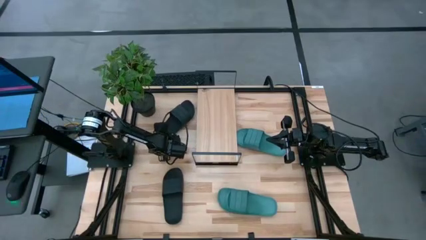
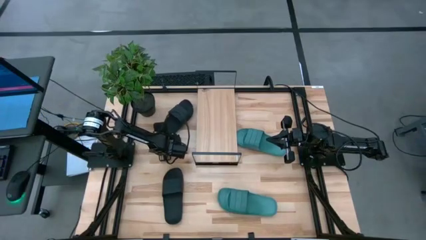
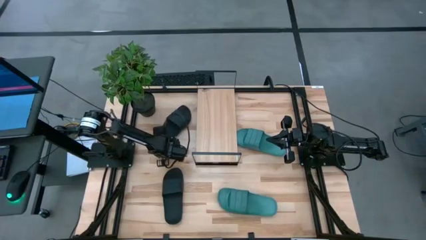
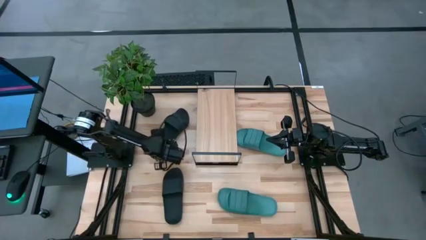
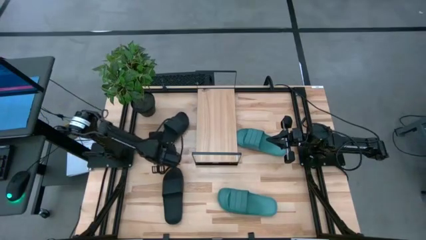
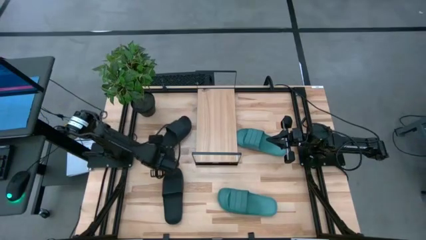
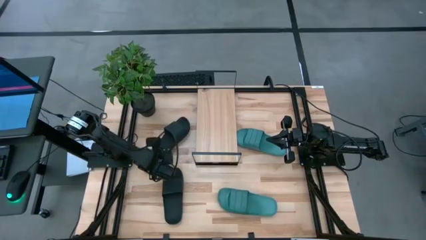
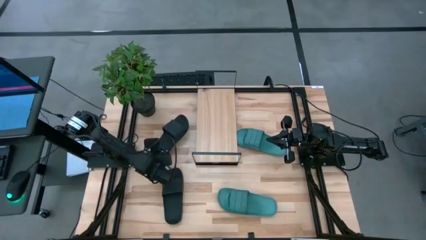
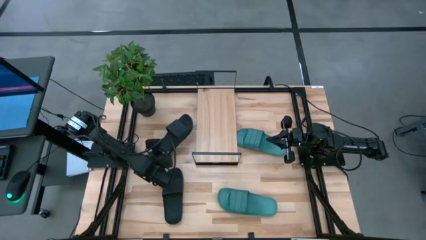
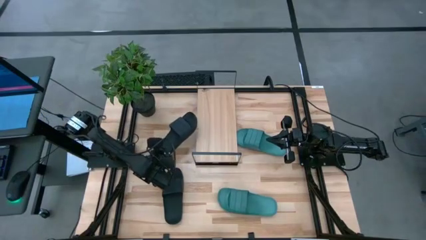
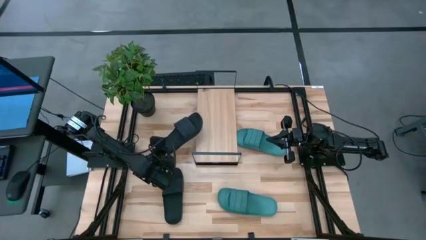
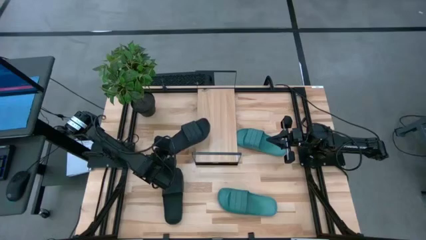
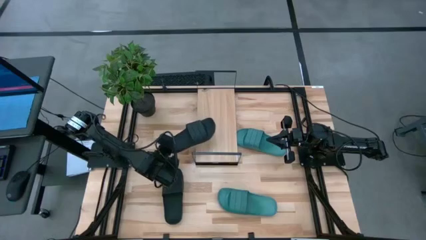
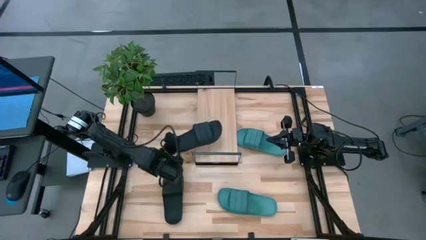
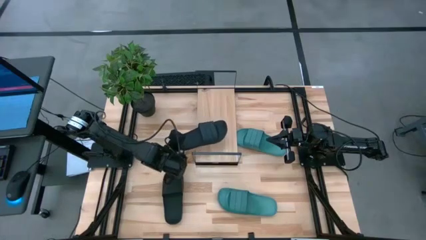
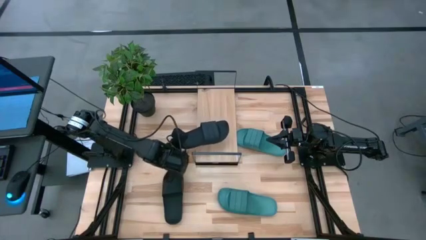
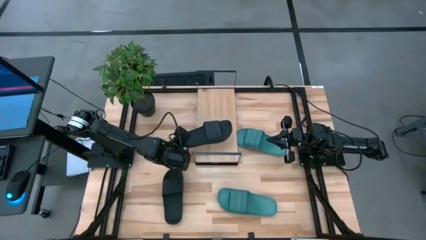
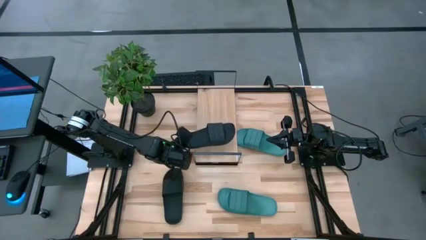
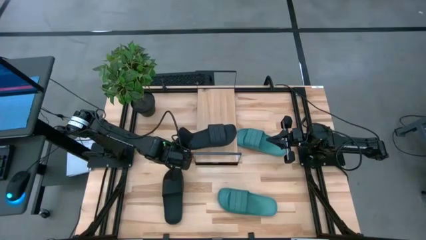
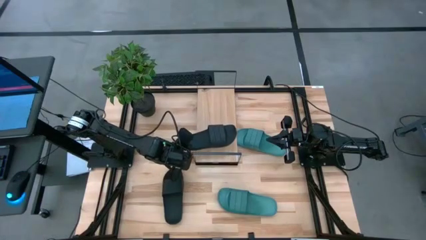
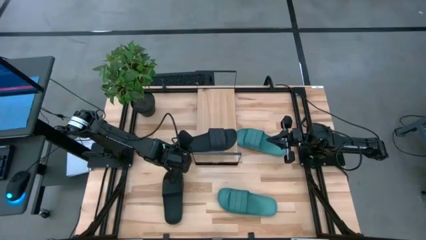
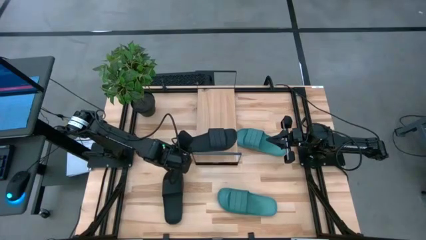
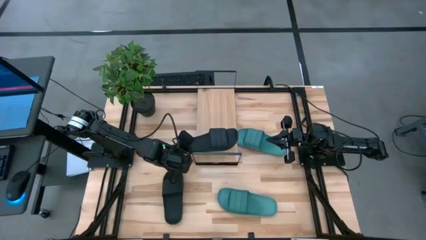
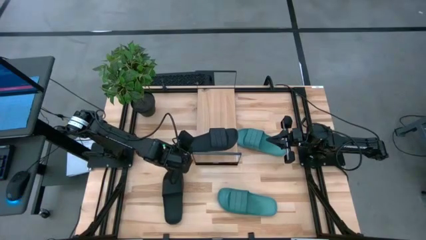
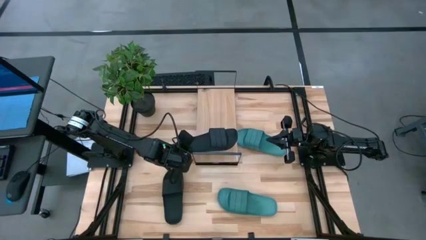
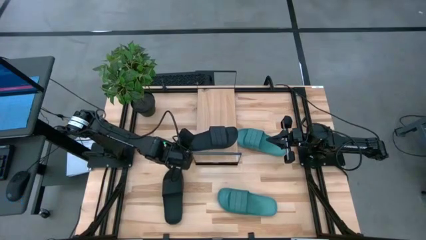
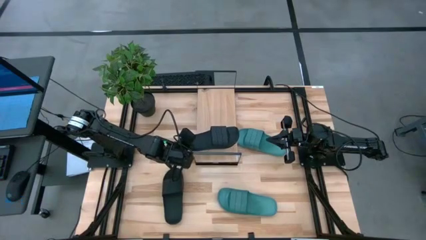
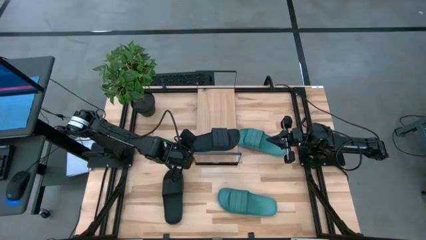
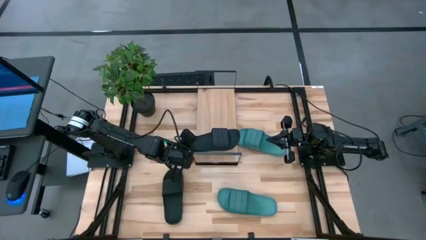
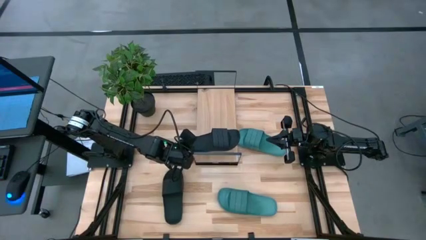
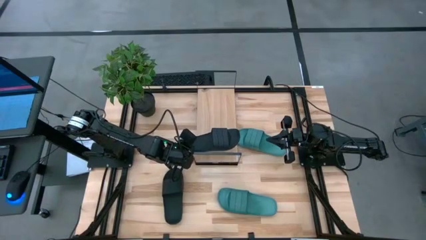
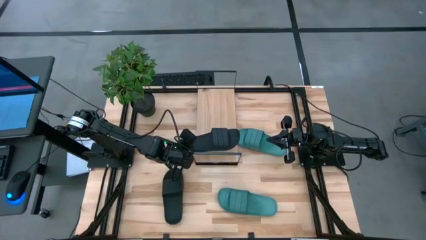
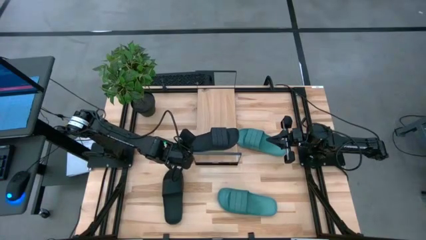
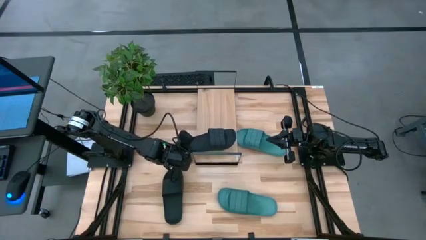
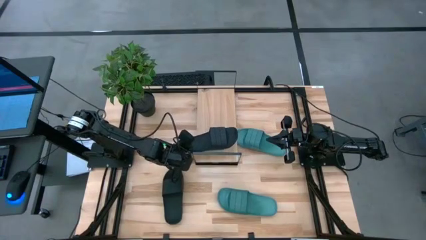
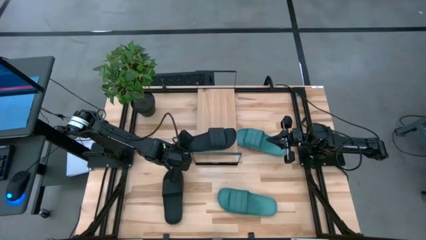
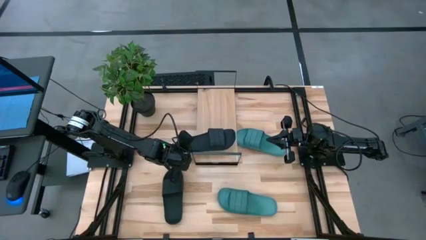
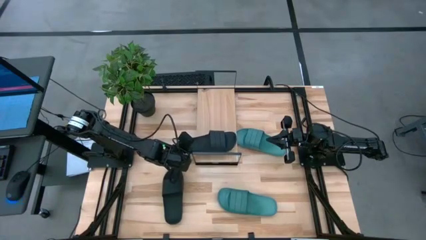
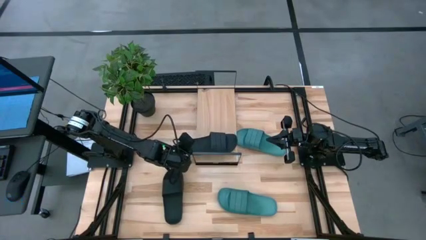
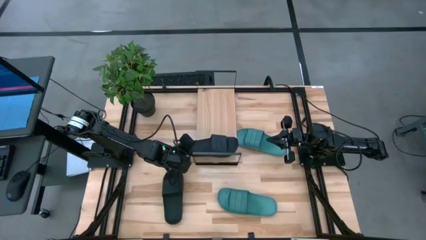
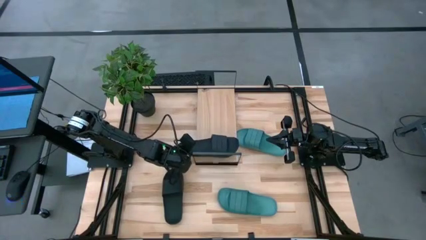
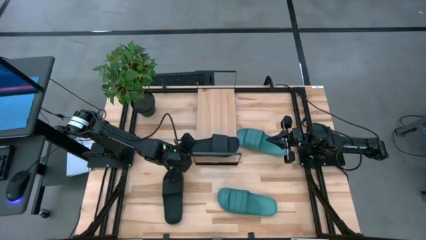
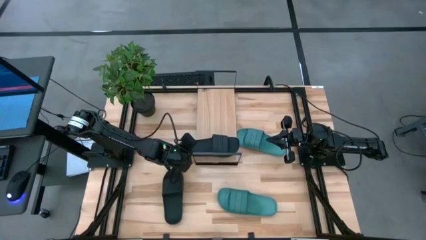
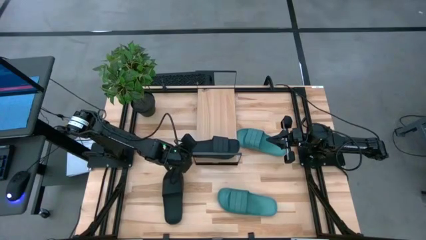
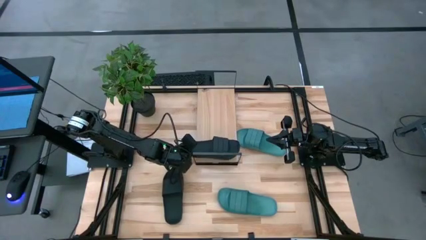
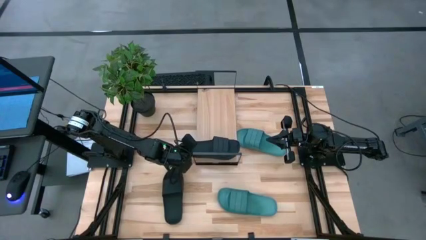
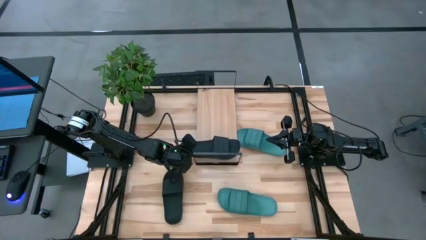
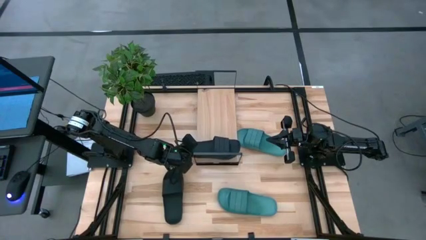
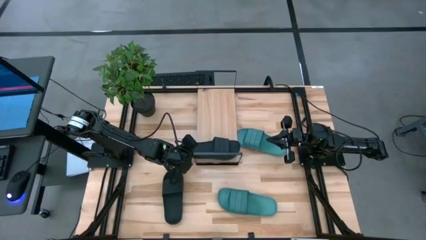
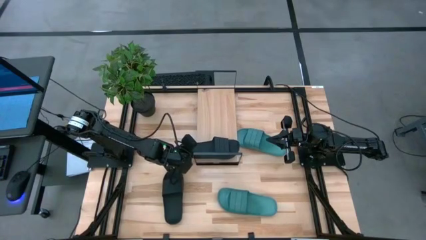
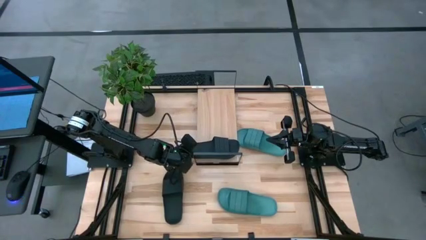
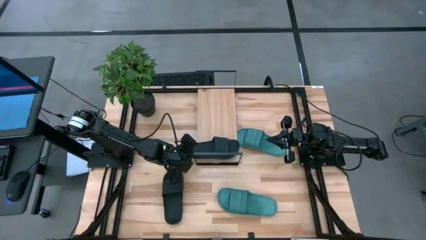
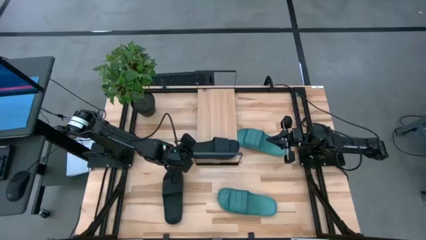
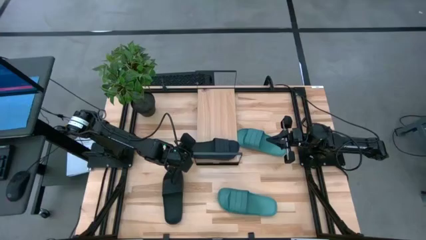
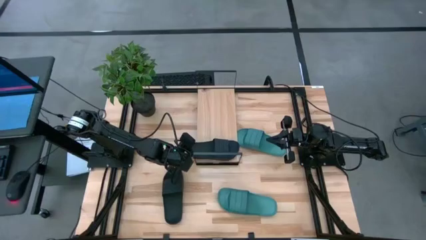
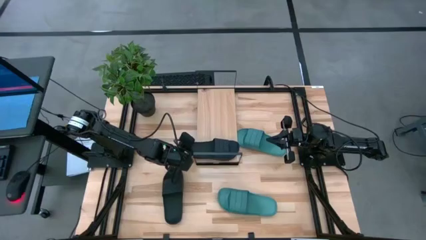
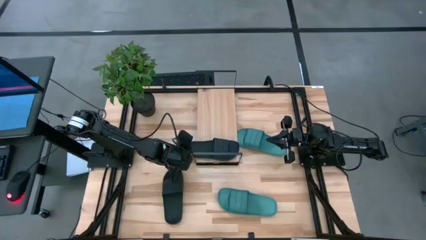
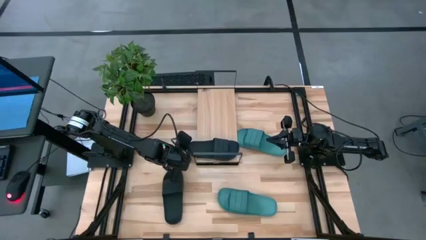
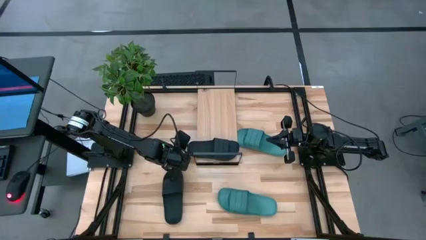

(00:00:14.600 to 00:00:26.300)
Task: Pick and place slides into the shelf
Put the top black slide on the shelf

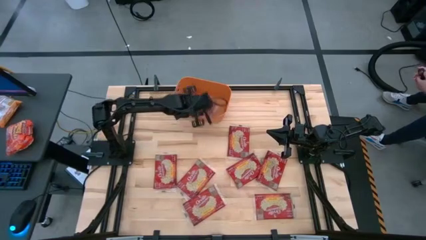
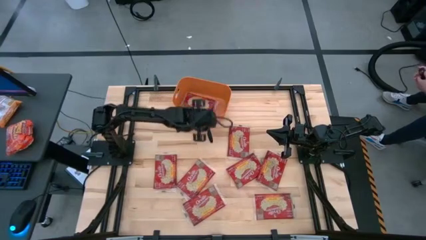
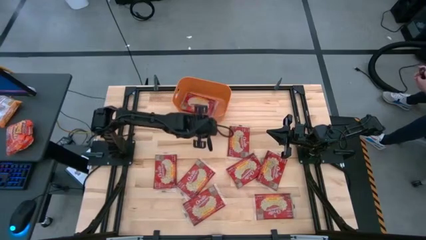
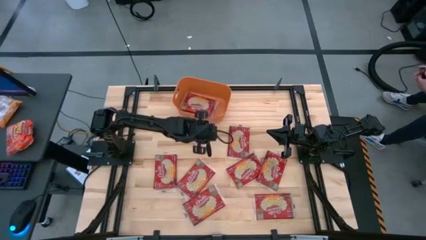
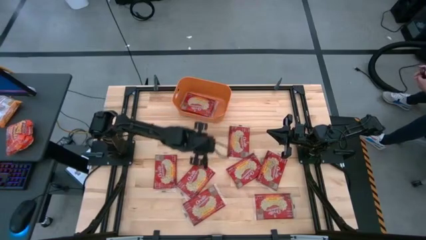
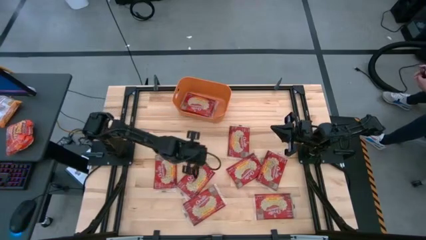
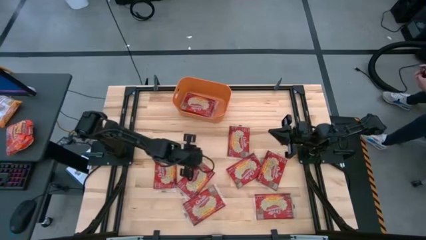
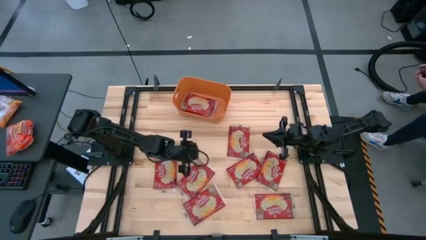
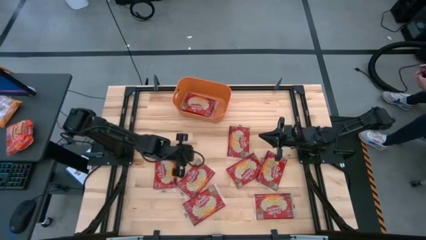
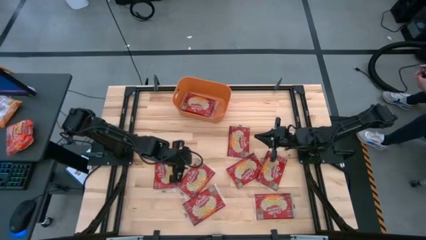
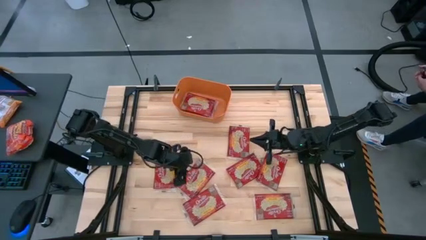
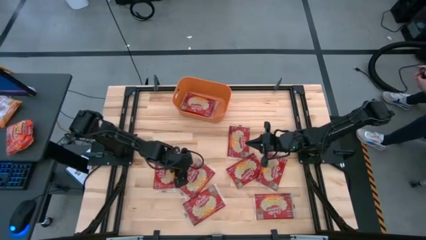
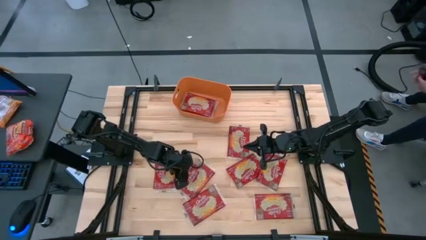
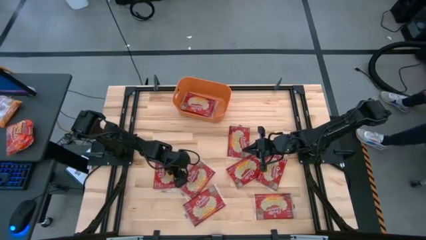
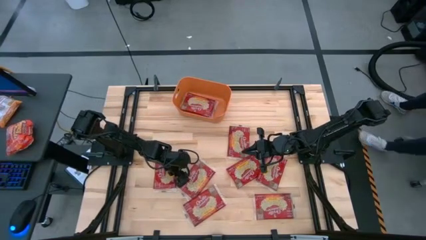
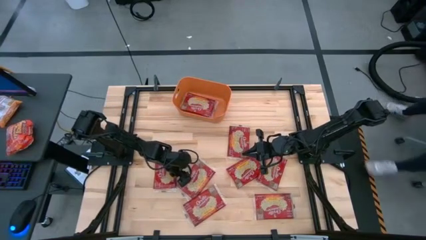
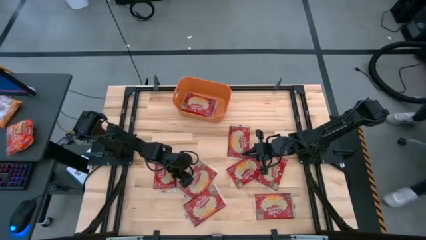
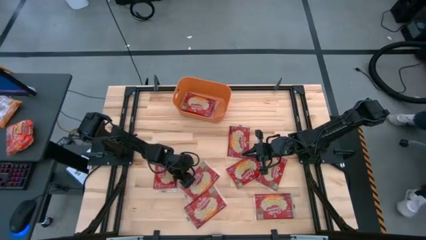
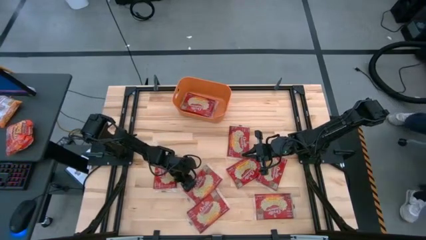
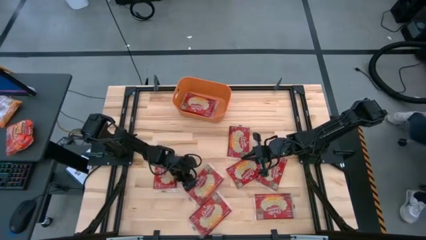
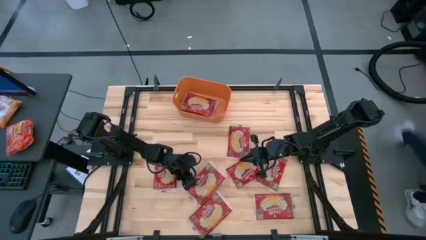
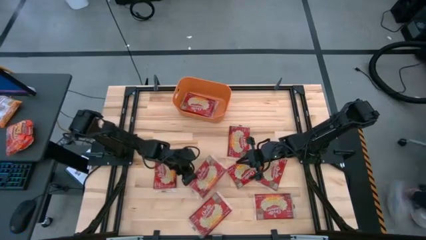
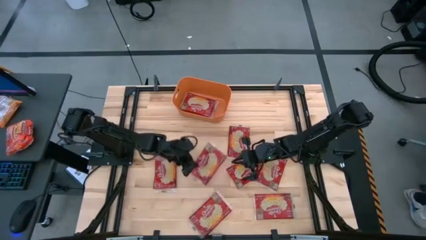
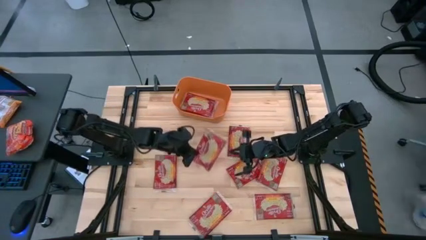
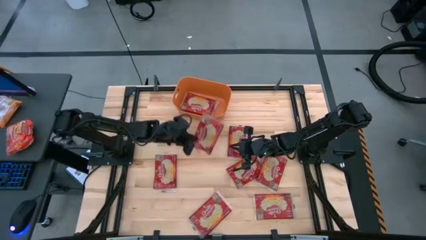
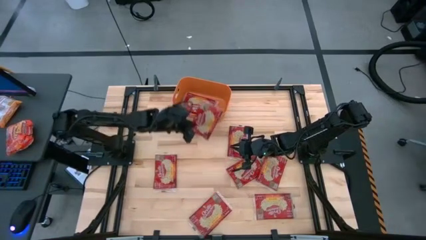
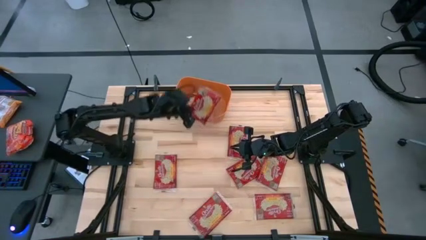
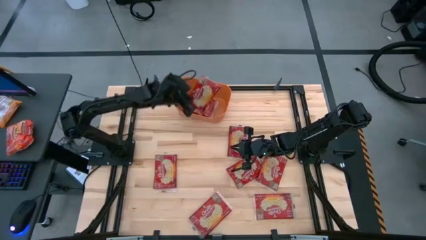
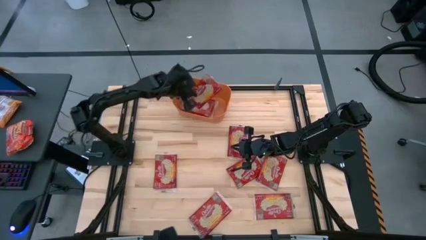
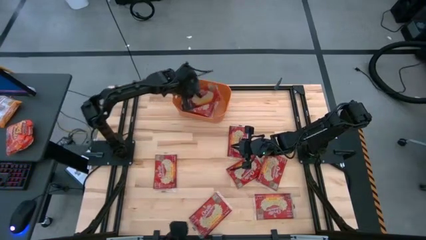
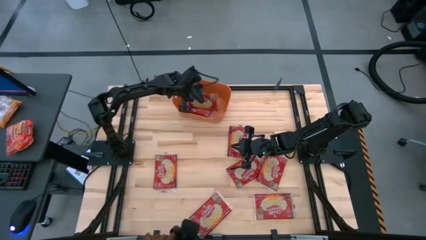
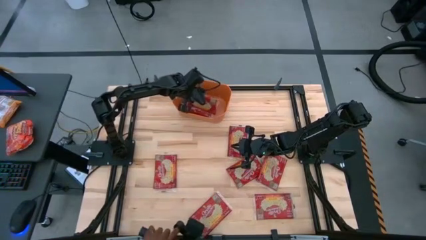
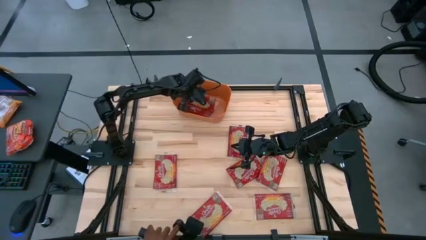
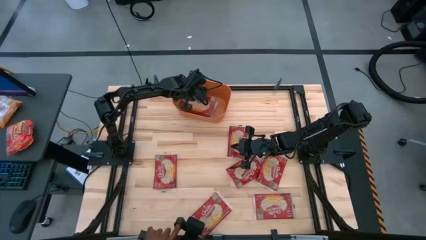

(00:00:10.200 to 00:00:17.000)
Task: Sort popcorn bags into baskets
Put the red popcorn bag into the orange bin
